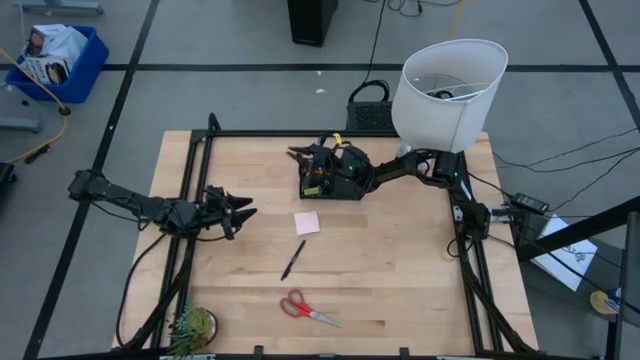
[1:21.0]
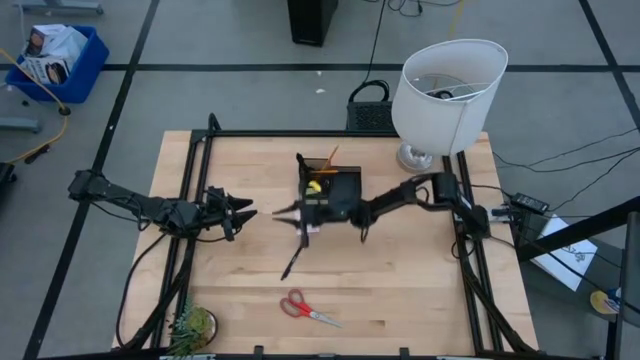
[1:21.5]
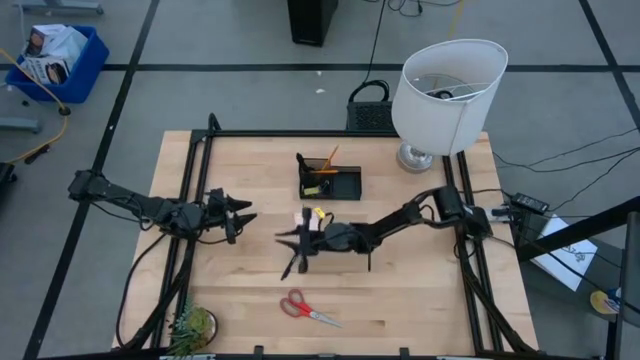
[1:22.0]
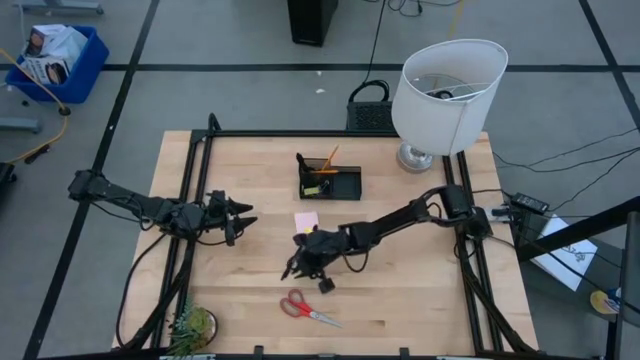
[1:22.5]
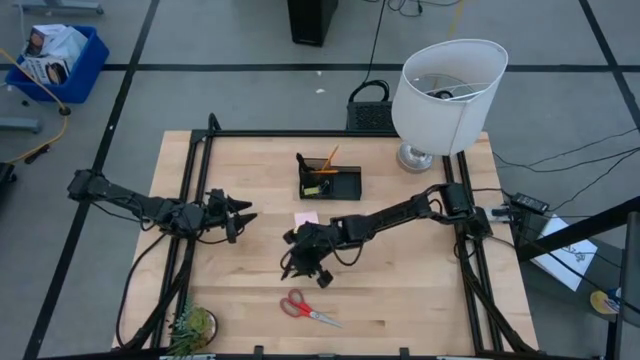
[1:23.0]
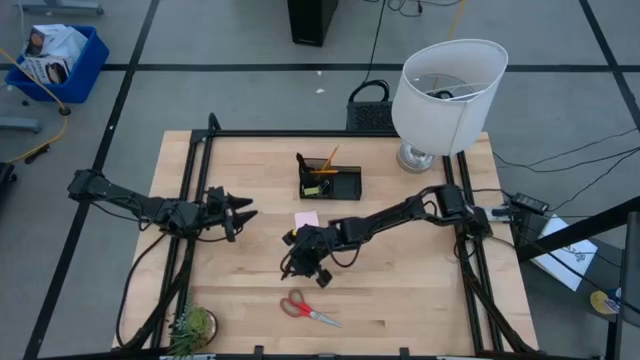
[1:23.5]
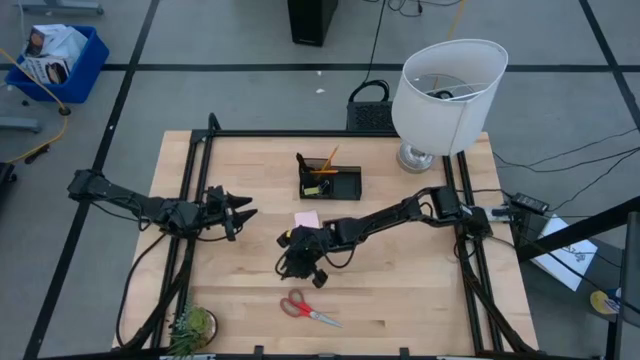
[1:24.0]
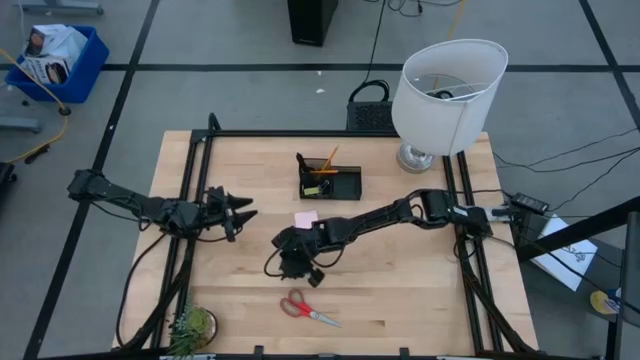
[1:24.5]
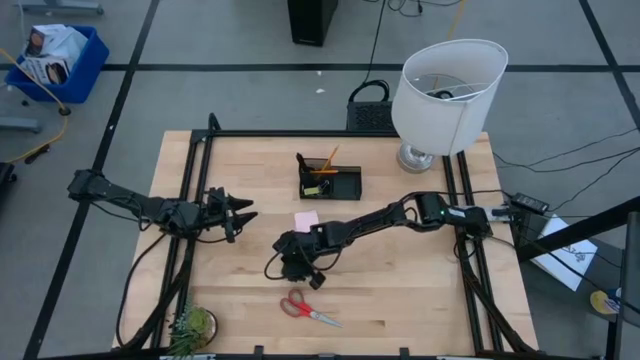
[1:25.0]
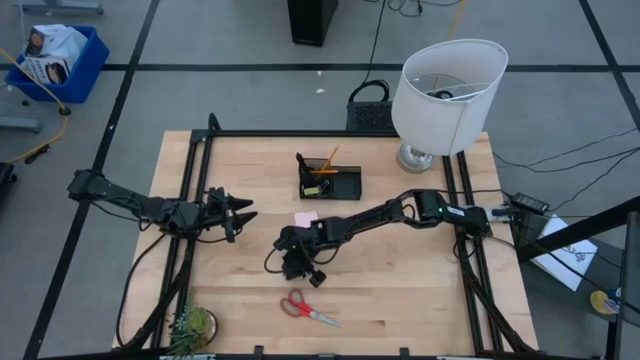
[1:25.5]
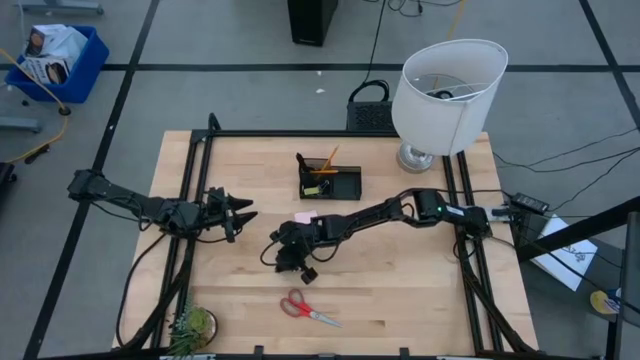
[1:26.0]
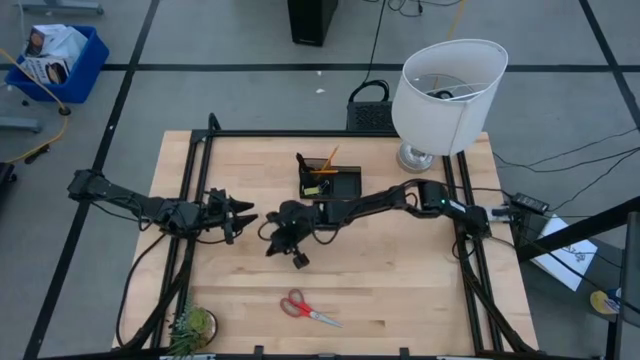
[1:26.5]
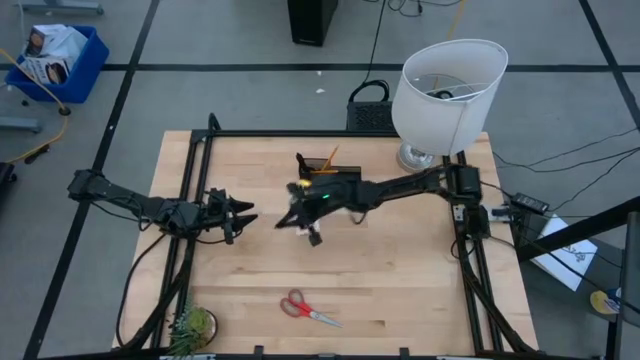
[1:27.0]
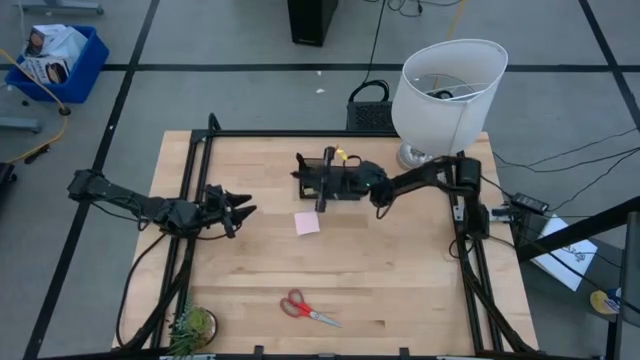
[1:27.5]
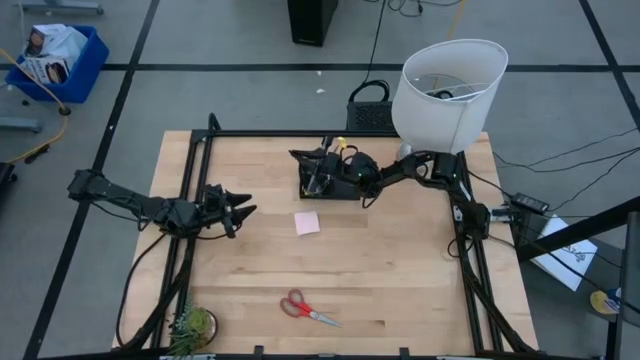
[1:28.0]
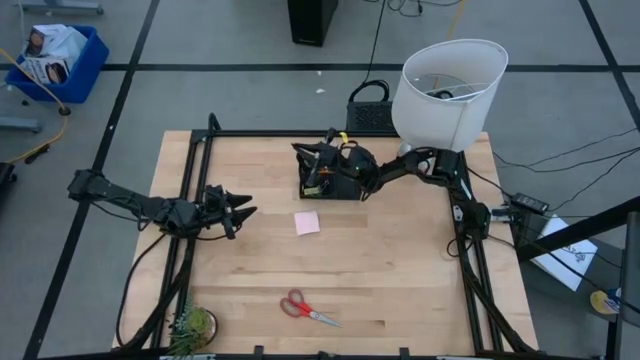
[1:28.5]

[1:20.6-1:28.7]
Task: Pick and place office supplies into organizer
Put the black pen into the desk organizer

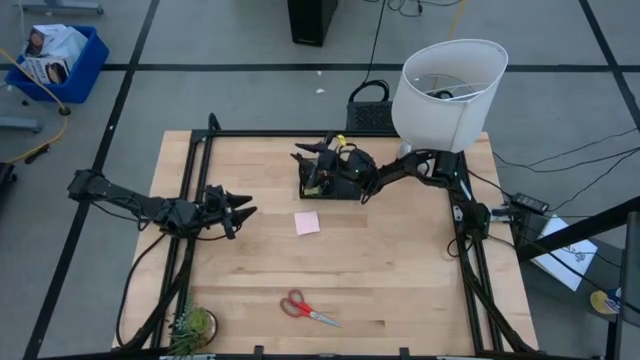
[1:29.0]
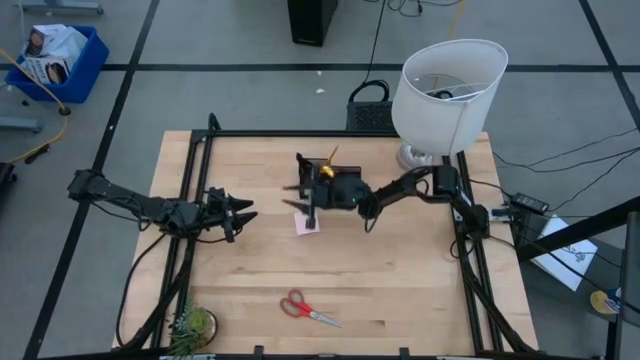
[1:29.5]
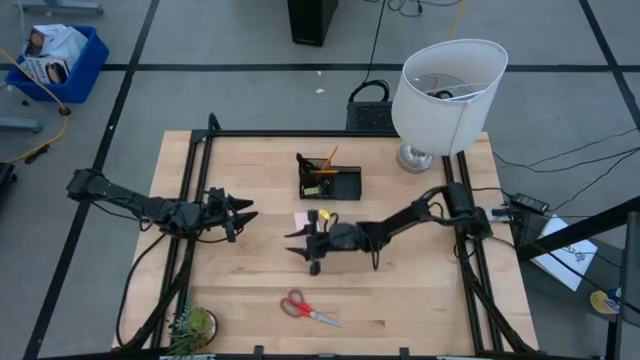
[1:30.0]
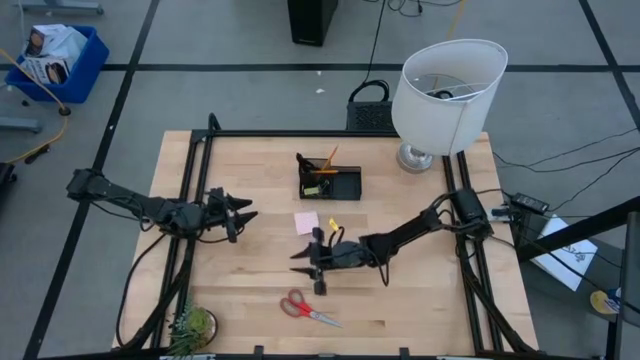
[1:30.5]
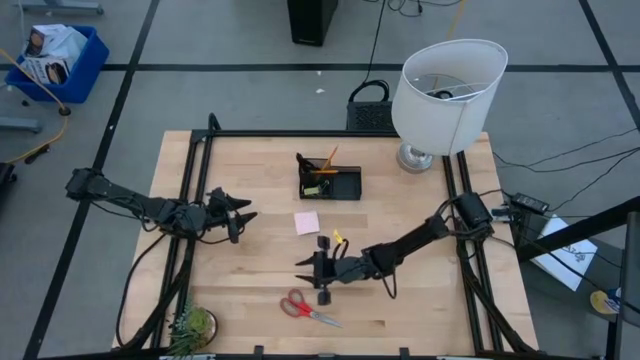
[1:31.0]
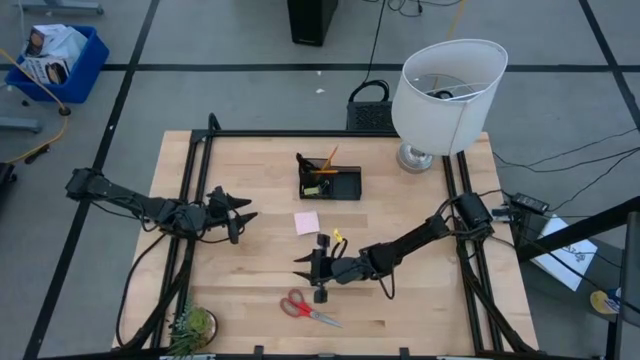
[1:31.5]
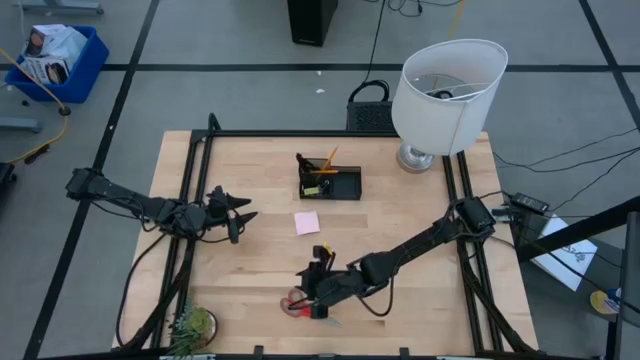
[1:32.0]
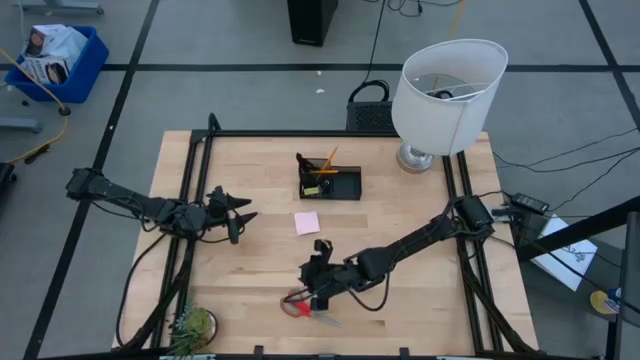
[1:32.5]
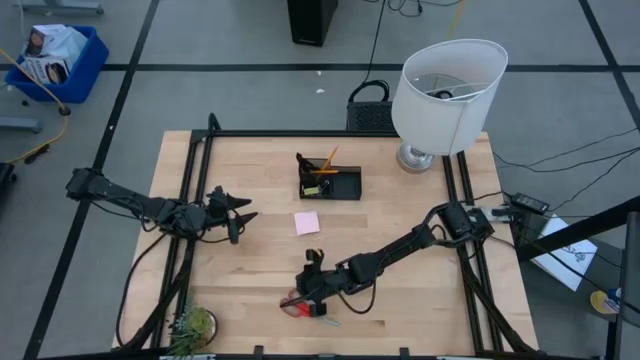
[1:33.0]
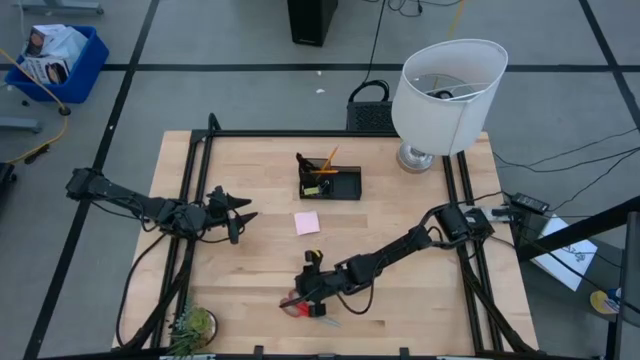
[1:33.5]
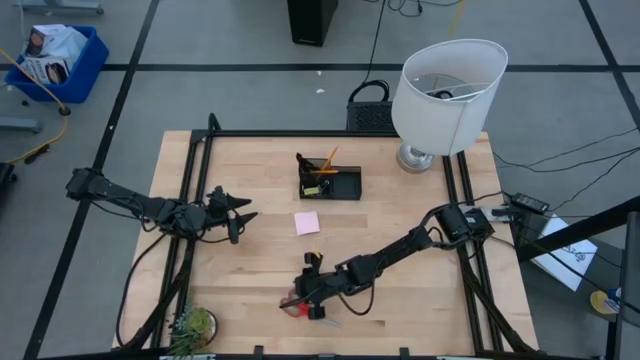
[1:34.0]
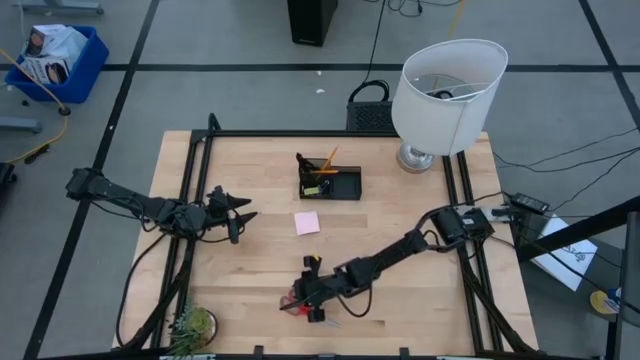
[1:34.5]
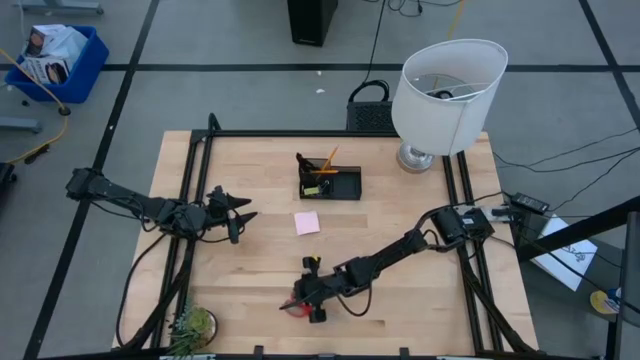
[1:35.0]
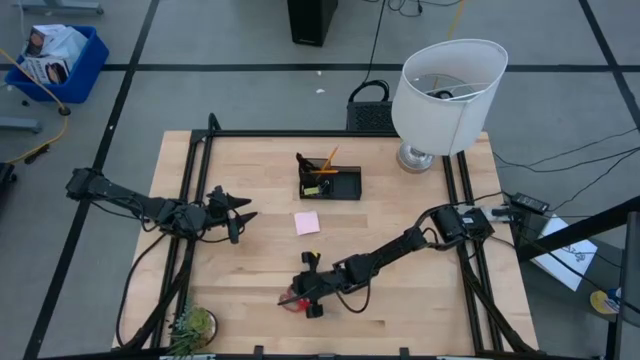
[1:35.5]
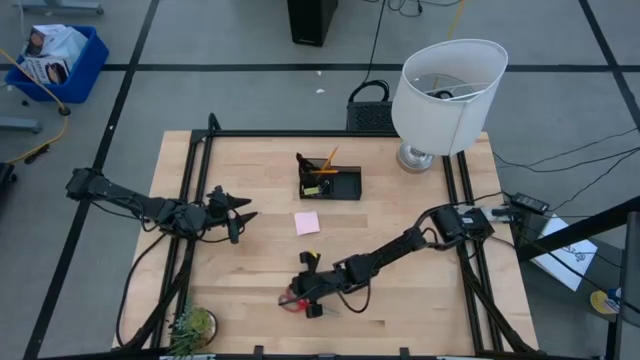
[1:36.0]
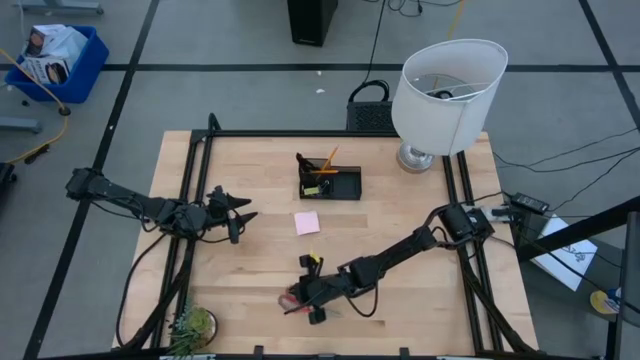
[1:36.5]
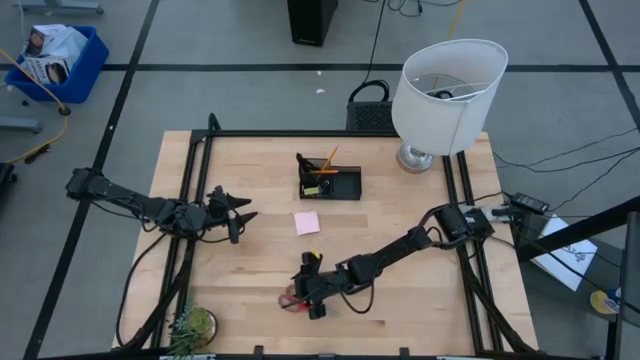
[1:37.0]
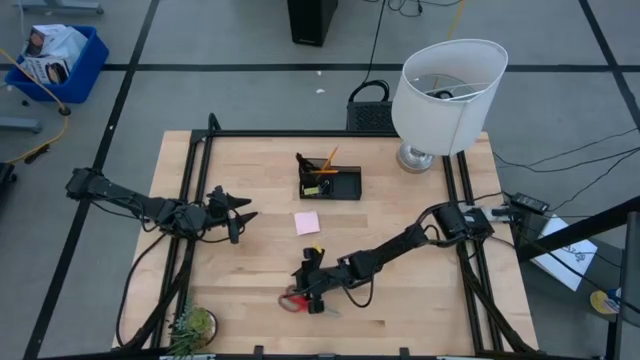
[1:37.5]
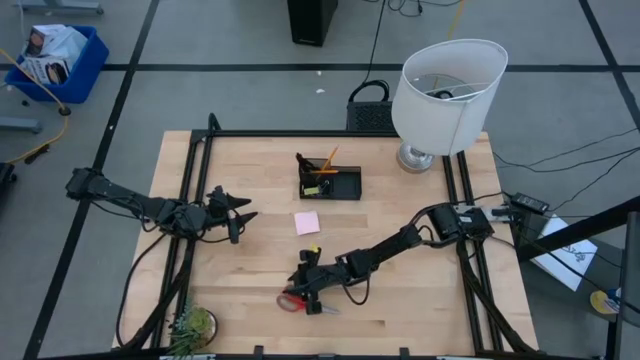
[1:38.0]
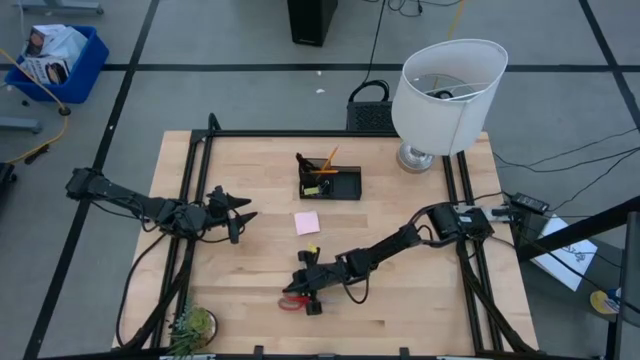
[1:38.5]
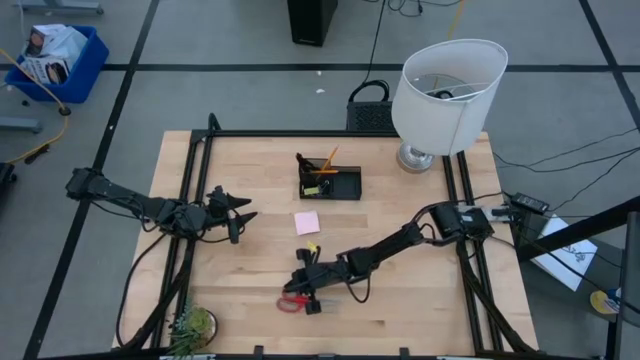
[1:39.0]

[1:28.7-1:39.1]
Put the red scissors into the desk organizer
